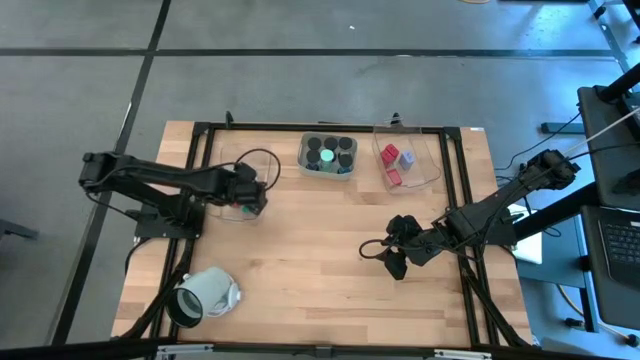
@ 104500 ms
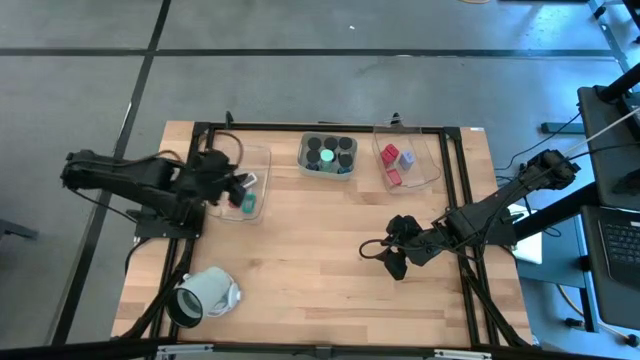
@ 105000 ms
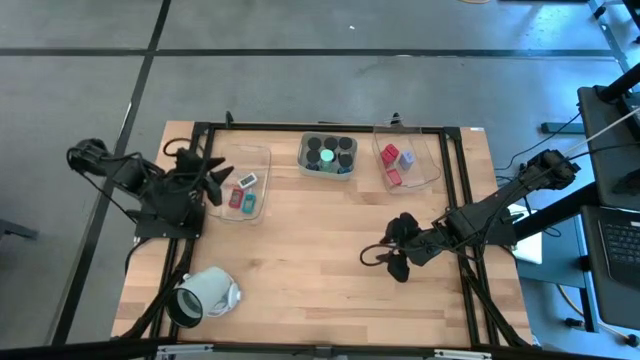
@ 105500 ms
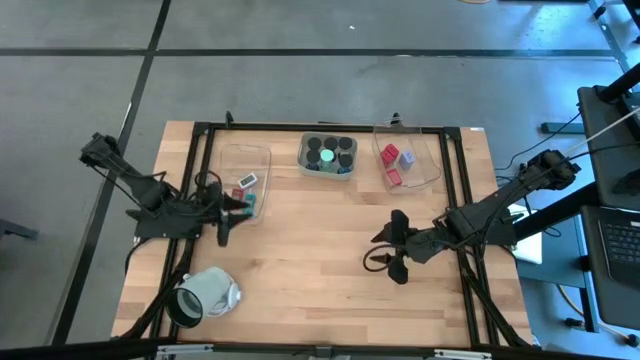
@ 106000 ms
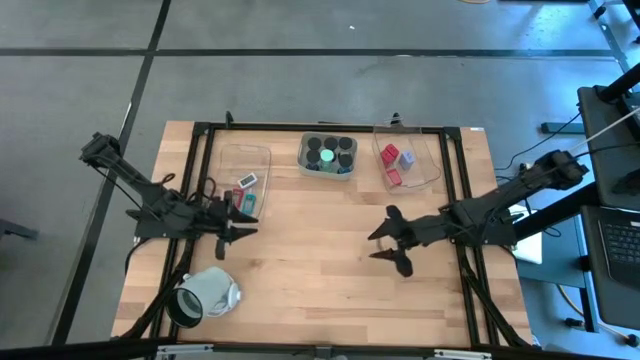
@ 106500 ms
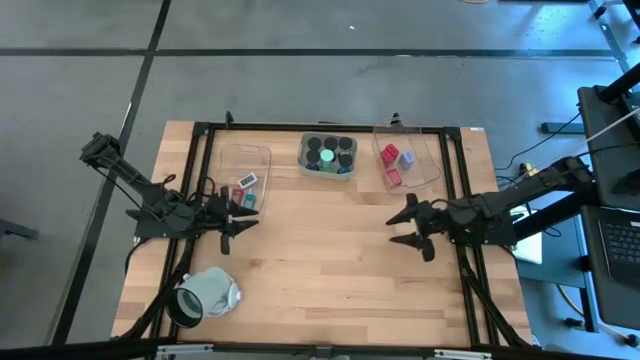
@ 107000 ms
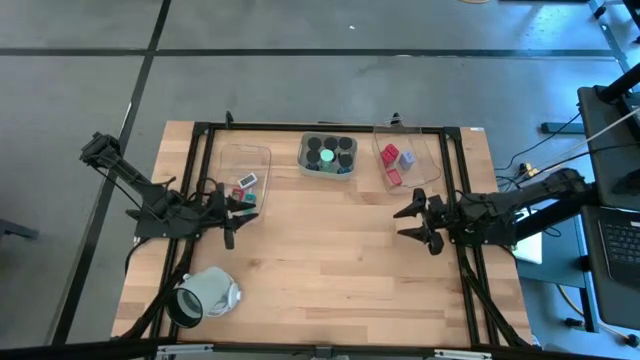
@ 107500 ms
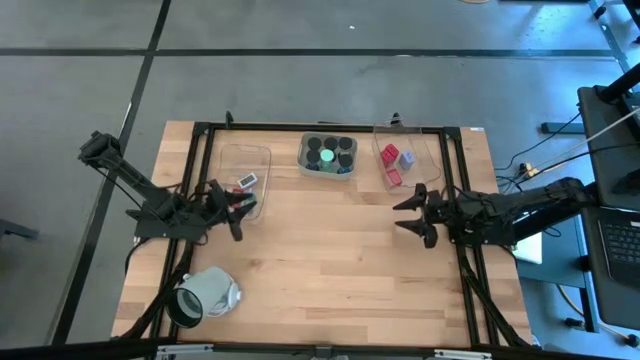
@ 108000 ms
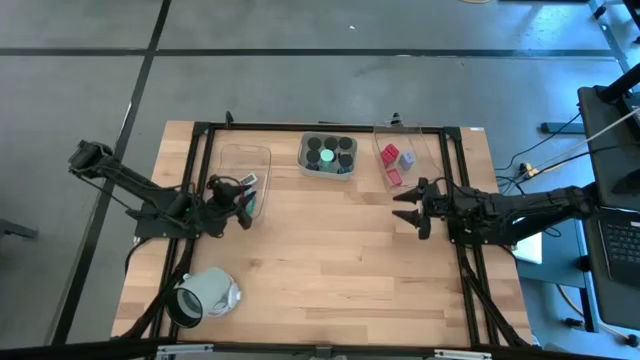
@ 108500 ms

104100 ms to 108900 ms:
Task: Pick & Place Office items
Return to Home Position

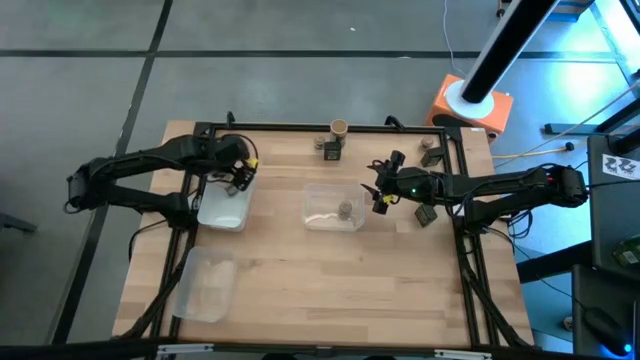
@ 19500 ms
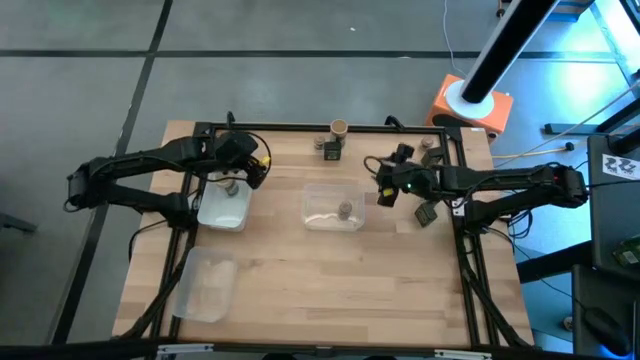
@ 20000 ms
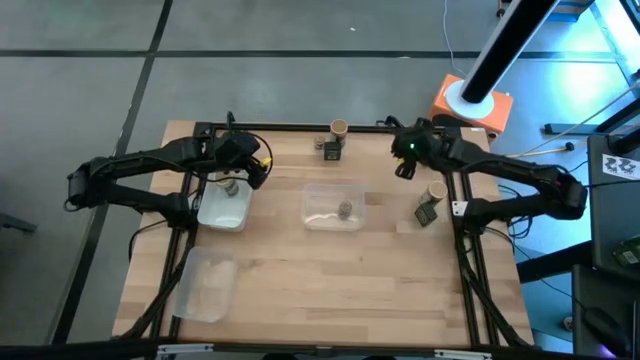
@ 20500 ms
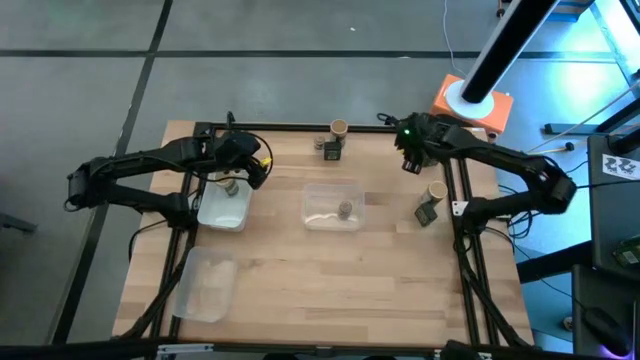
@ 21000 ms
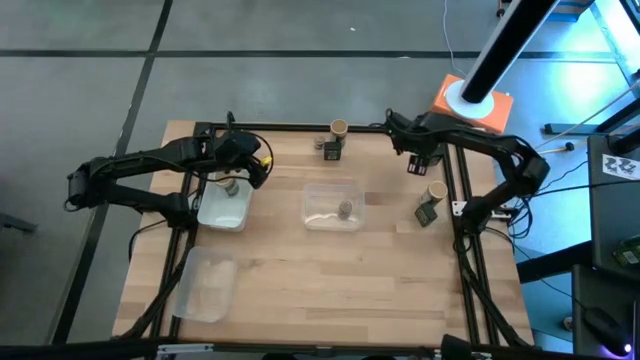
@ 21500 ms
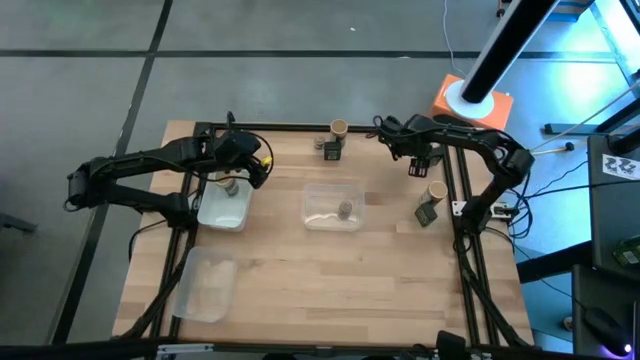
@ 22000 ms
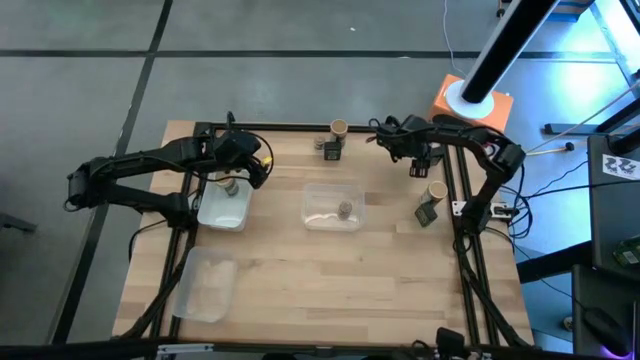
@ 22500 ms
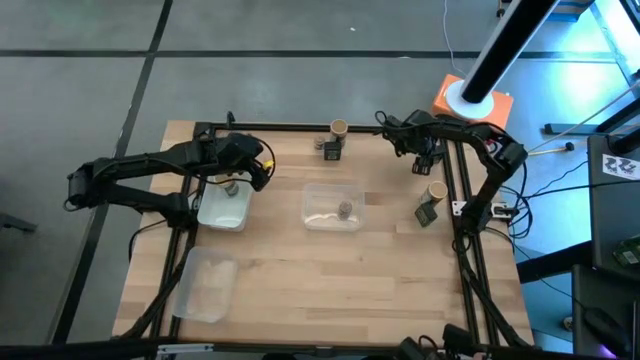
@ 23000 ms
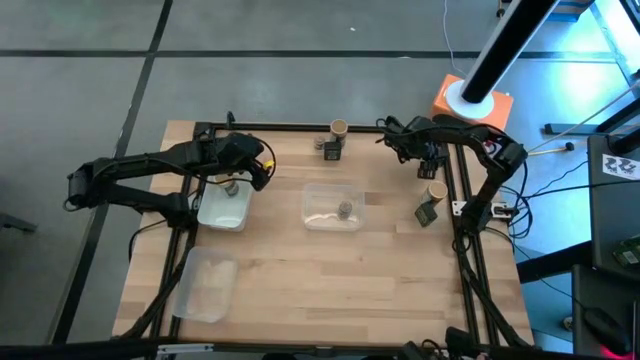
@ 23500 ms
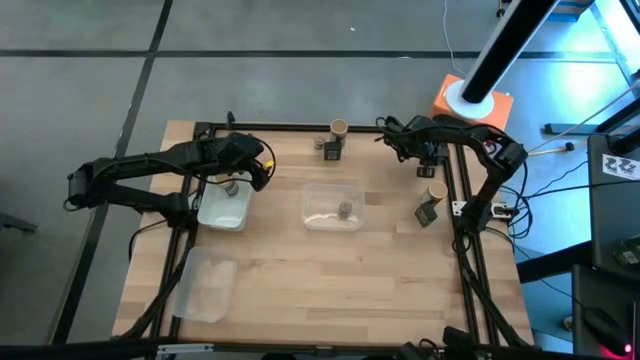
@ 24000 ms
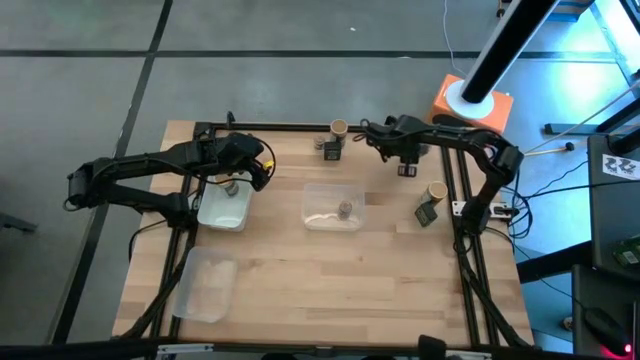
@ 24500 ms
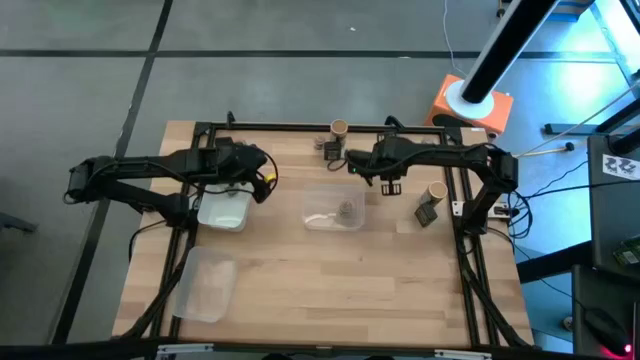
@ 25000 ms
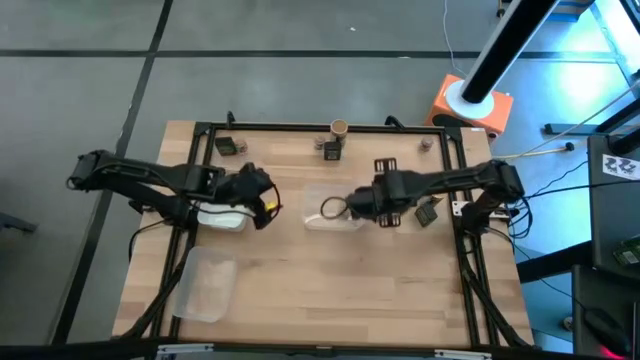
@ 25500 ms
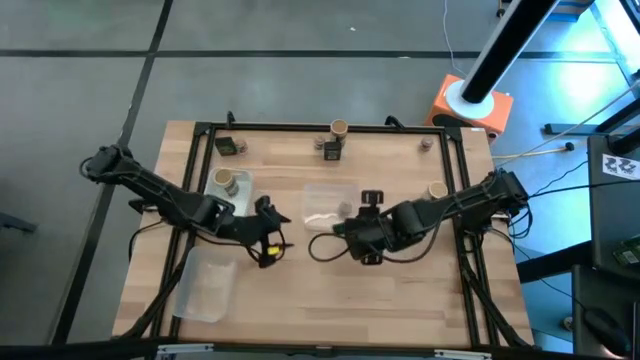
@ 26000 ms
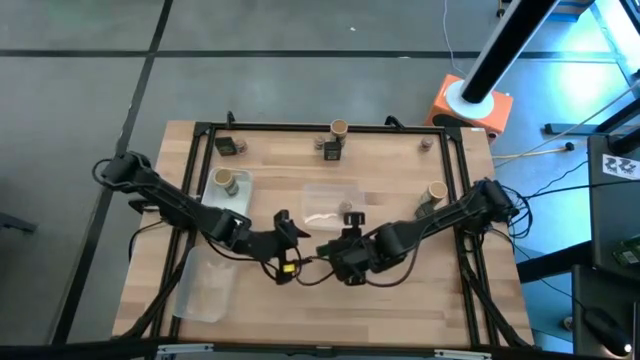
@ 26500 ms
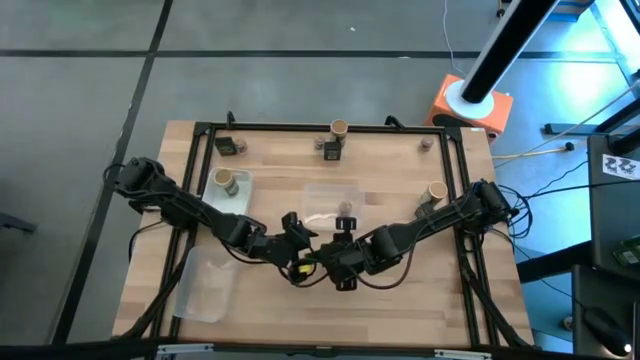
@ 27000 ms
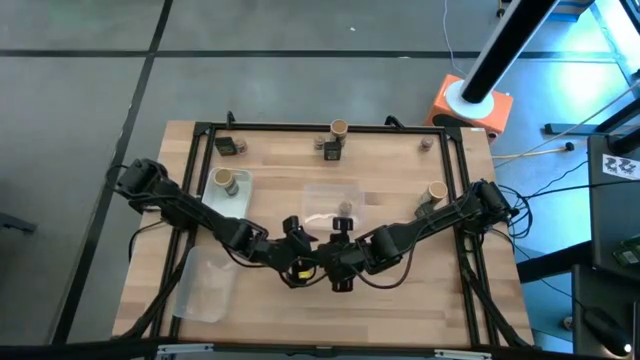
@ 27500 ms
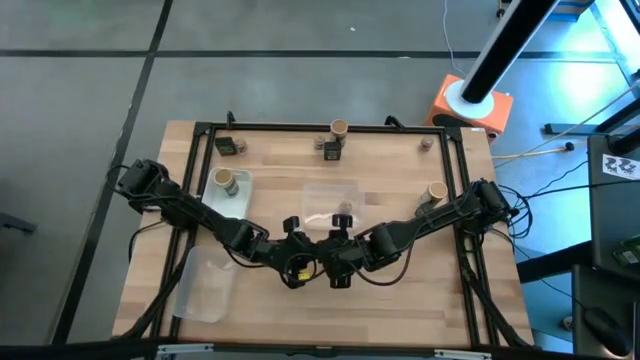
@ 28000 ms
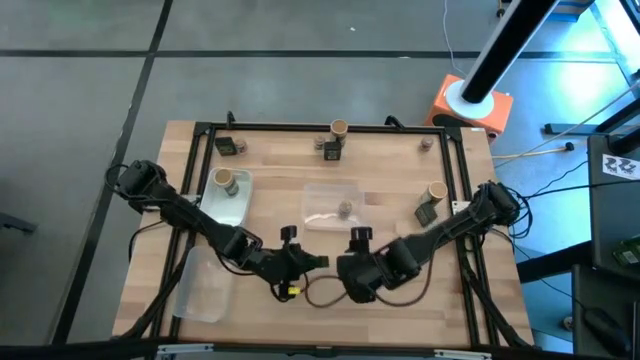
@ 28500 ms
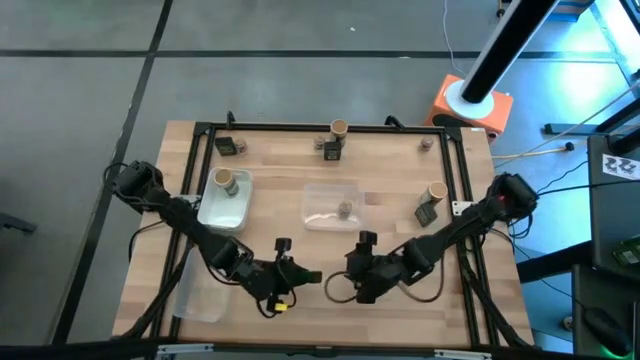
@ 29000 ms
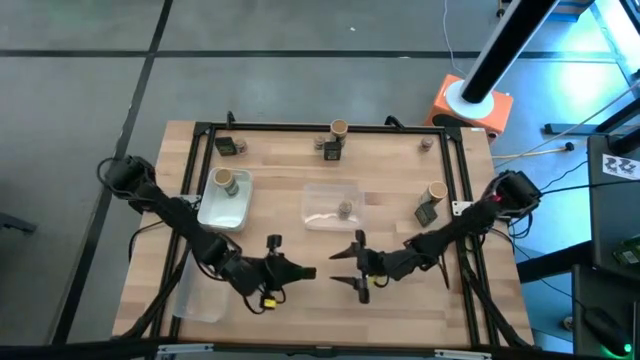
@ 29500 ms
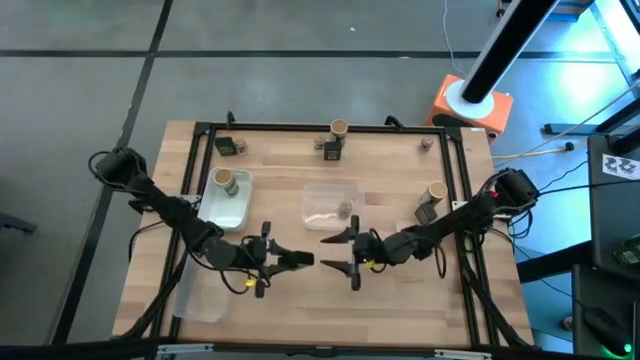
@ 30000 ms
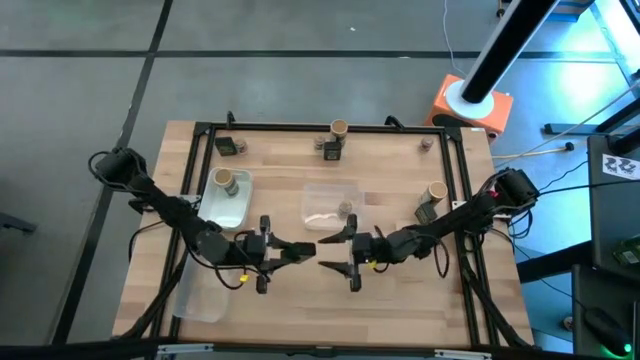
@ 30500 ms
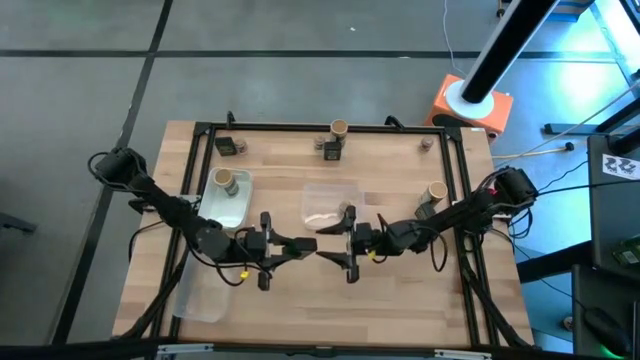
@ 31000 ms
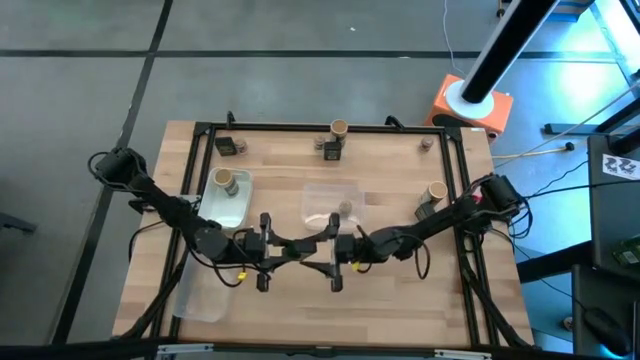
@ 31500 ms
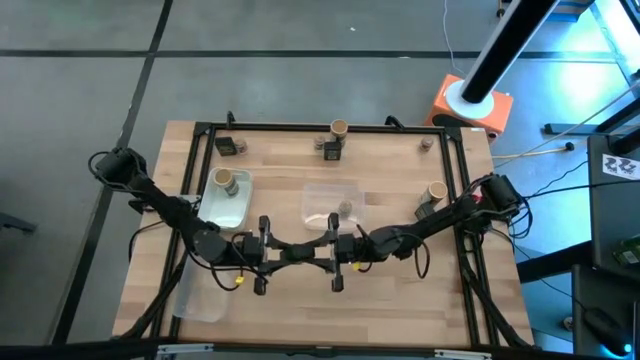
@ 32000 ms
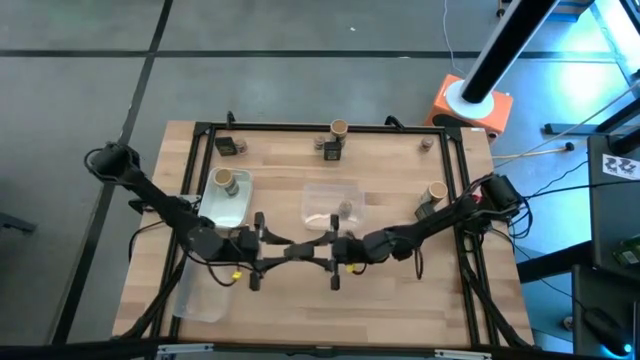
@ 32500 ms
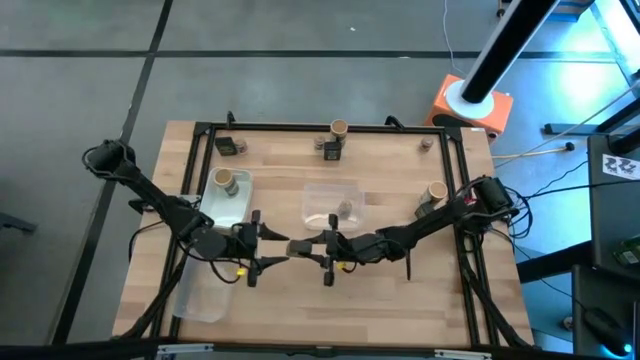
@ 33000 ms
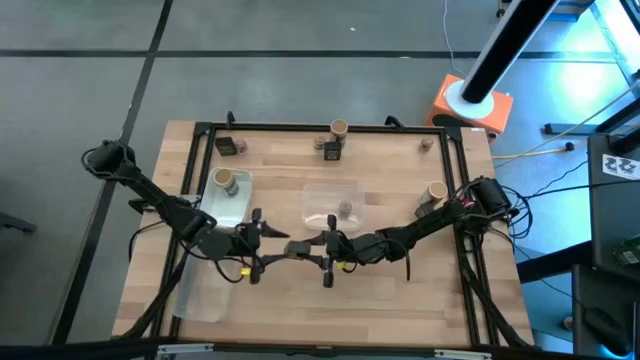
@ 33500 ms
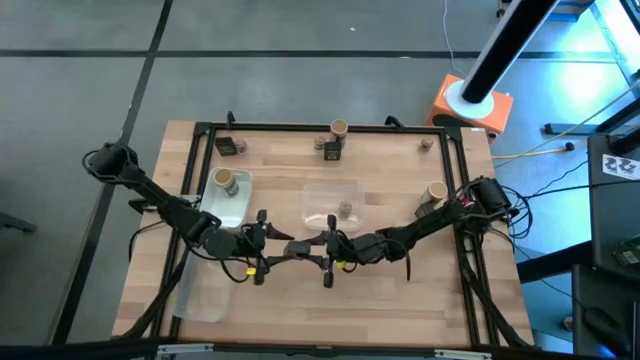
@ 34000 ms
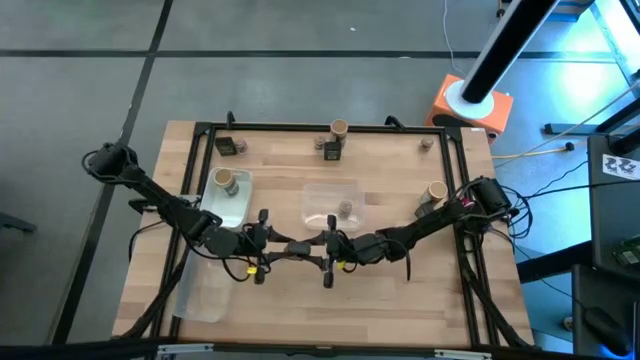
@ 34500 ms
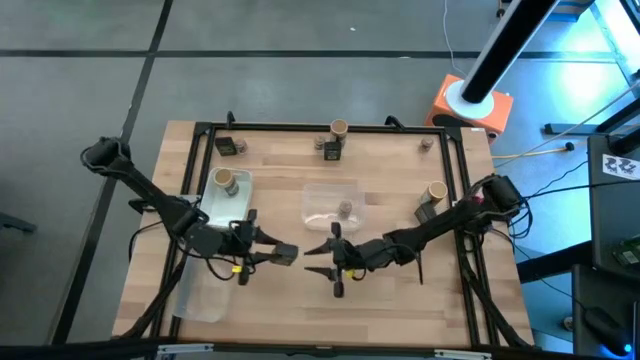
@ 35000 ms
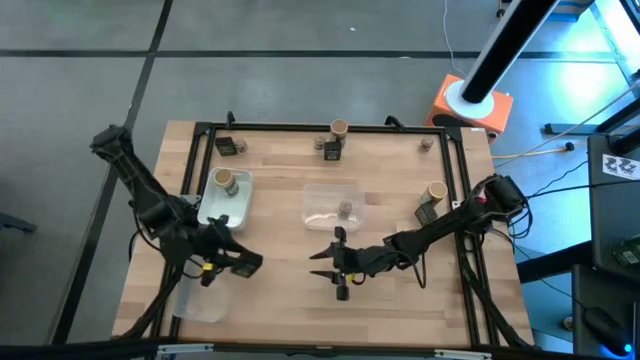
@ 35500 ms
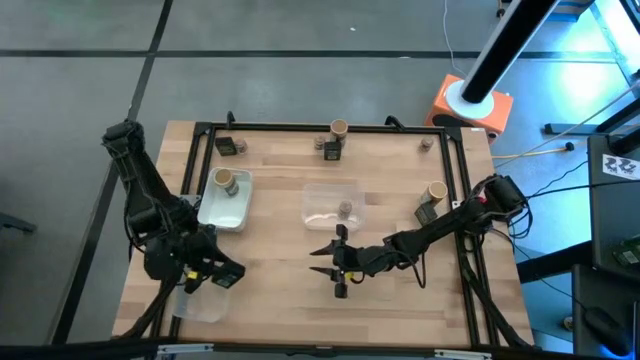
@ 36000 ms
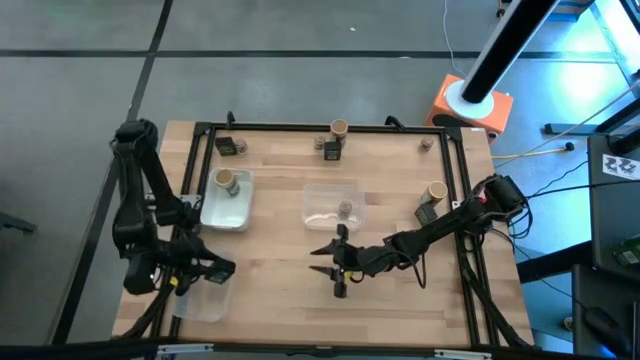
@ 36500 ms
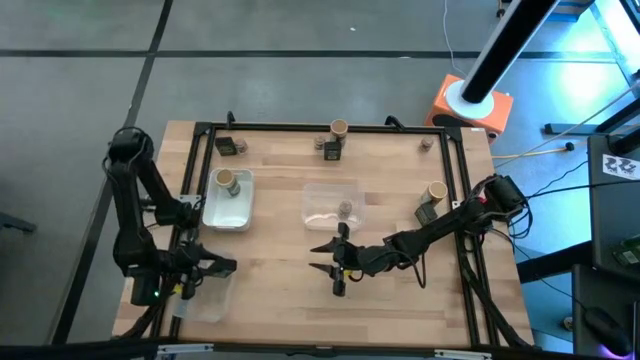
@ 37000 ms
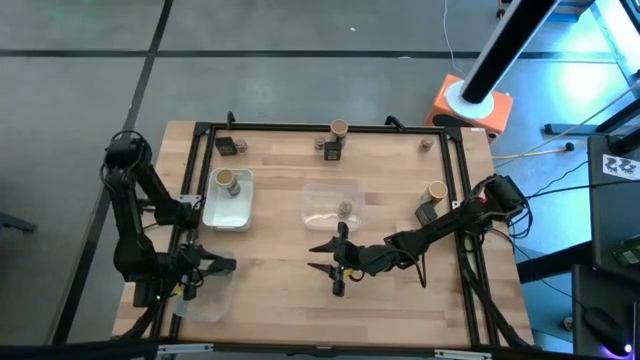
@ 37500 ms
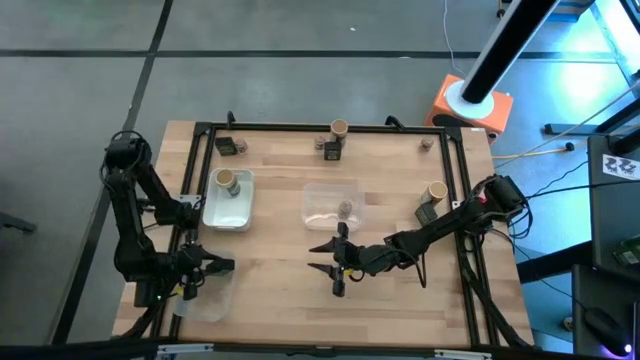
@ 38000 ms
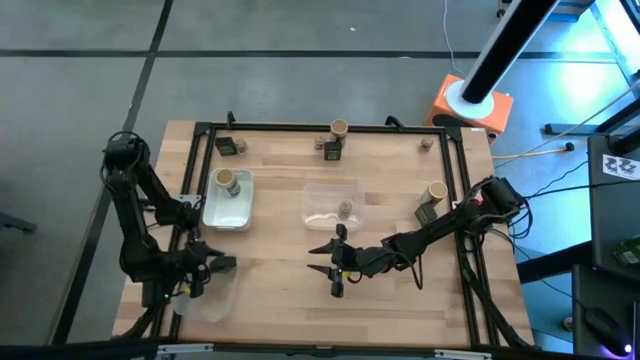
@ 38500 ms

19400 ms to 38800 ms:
Task: Sort spices by type
Put the black seasoning can into the bottom transparent bin
